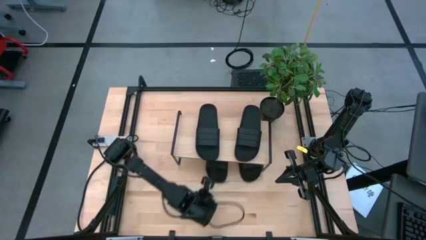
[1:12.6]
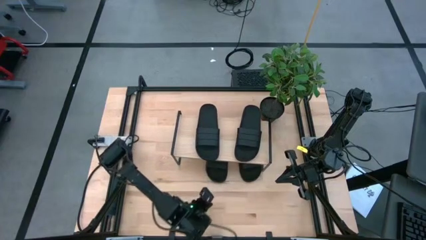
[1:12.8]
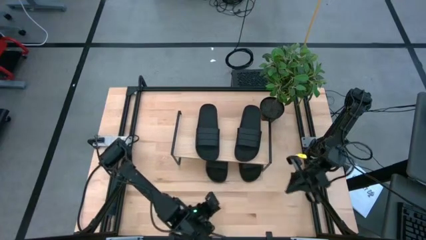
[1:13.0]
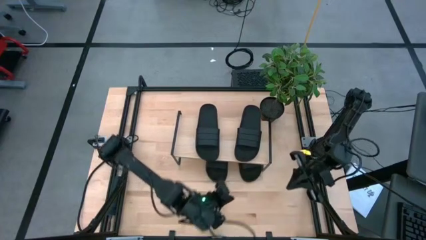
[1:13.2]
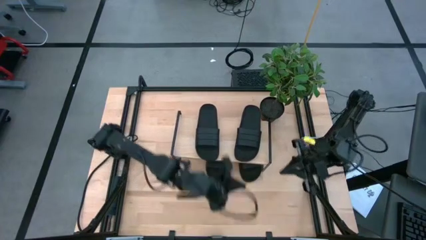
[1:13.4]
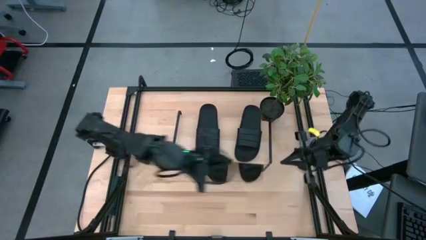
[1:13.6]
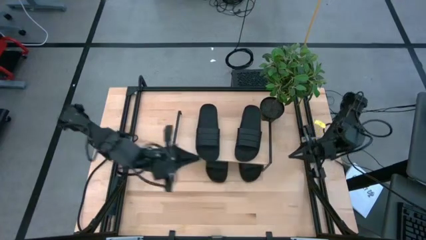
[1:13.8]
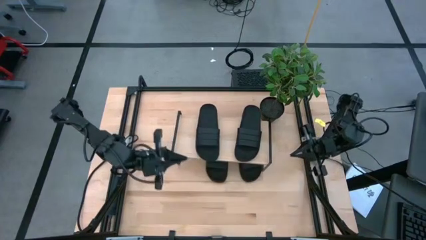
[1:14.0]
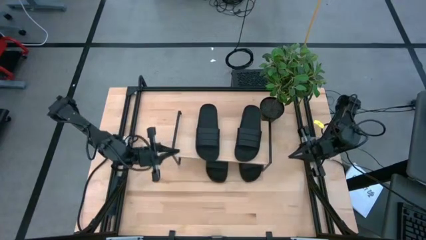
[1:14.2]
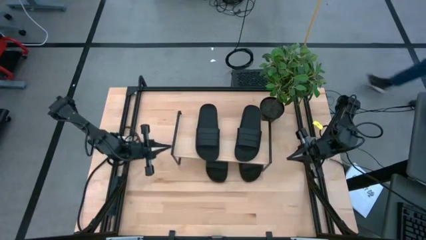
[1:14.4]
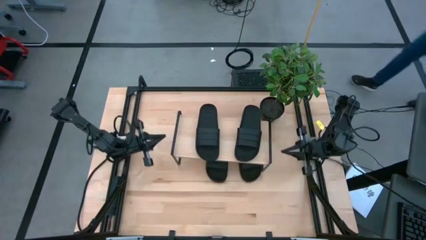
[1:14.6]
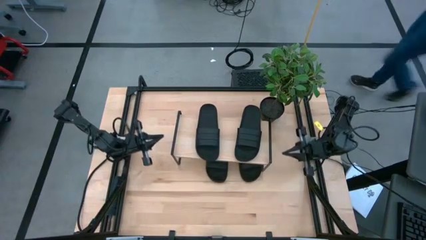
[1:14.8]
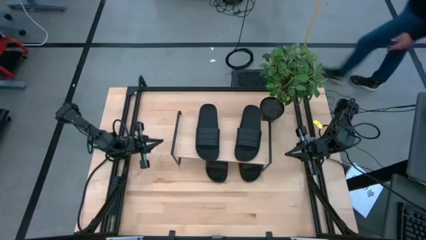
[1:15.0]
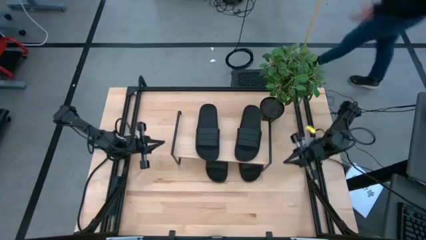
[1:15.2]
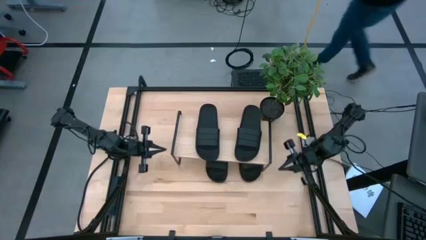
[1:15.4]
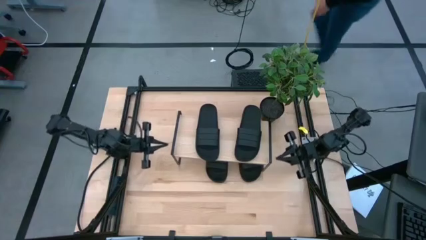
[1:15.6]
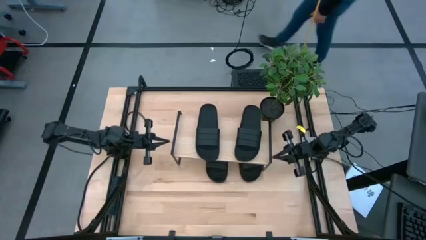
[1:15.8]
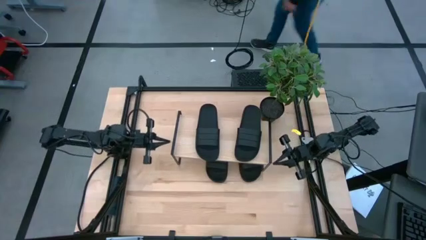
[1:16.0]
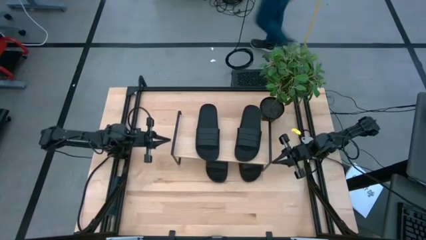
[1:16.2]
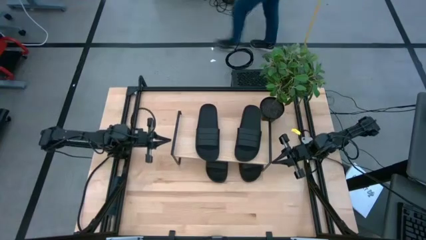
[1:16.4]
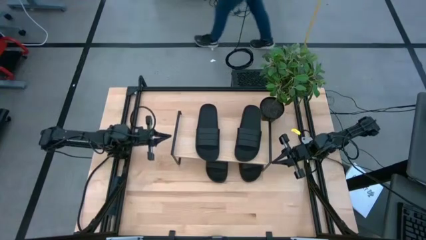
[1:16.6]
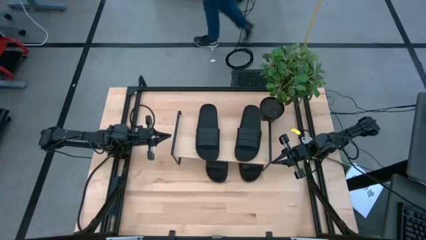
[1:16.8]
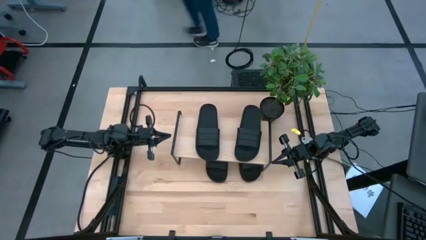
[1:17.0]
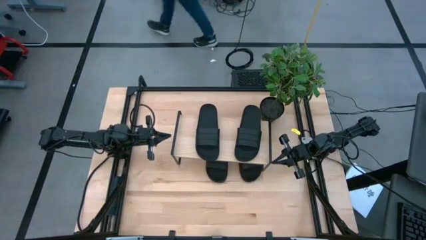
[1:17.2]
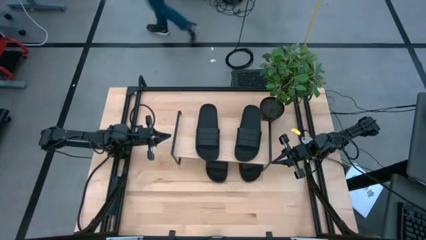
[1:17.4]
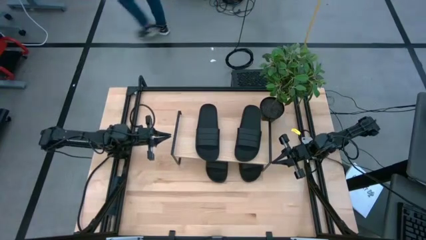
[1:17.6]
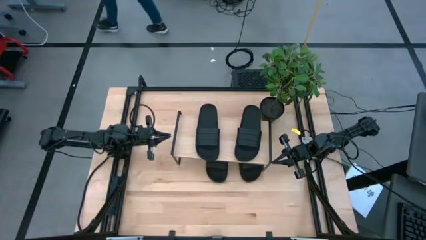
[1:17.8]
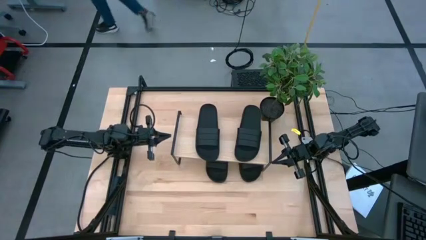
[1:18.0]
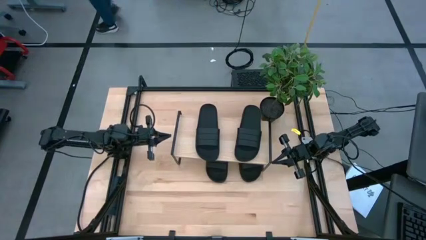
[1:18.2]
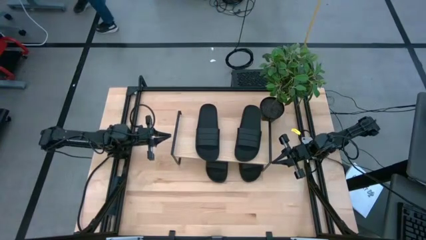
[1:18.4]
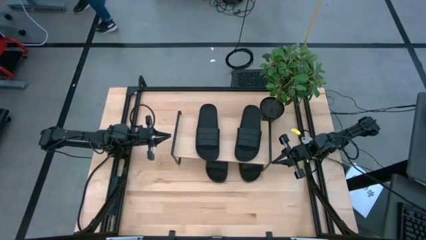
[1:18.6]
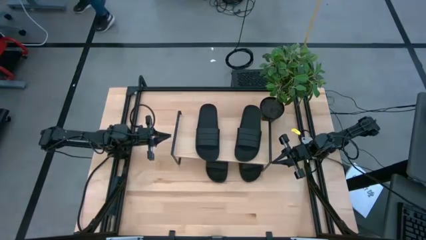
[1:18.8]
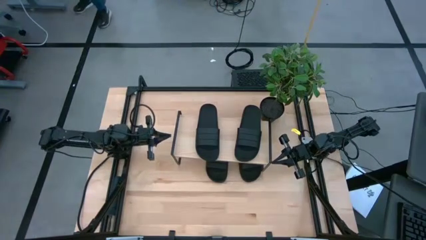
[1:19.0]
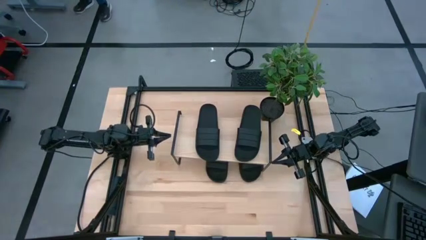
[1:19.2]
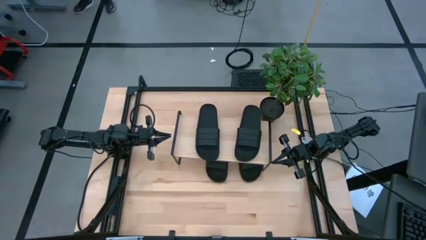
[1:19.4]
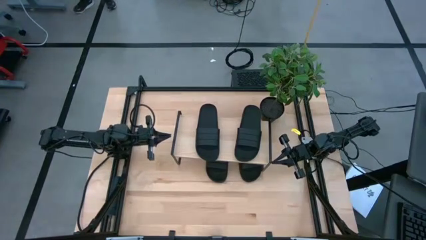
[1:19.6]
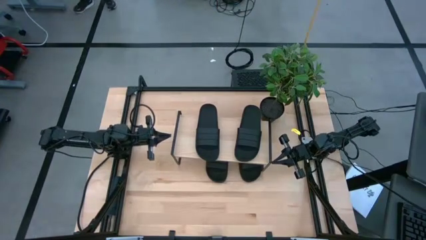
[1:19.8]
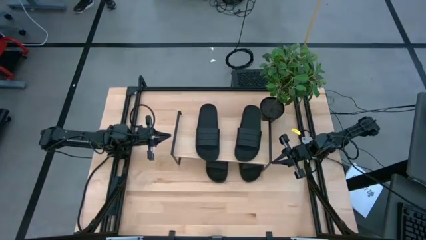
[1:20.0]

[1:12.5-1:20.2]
Task: Pick and place slides into the shelf
Return to Home Position

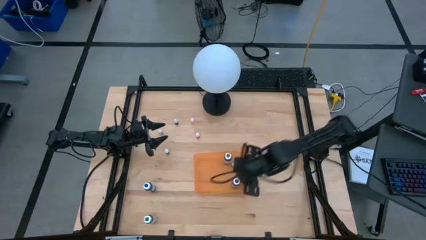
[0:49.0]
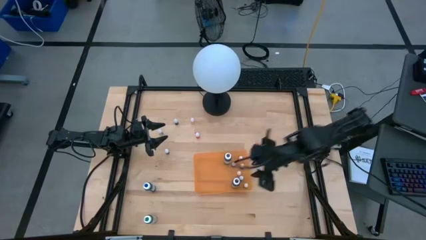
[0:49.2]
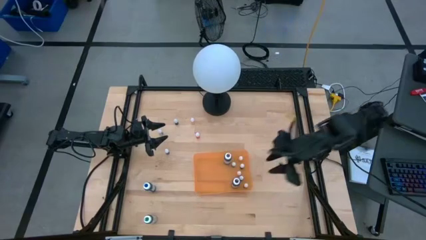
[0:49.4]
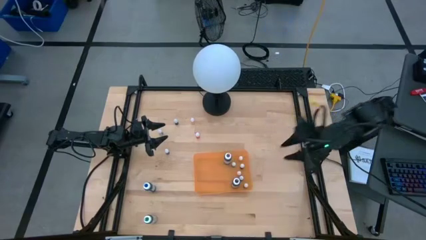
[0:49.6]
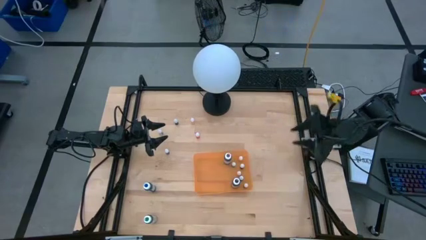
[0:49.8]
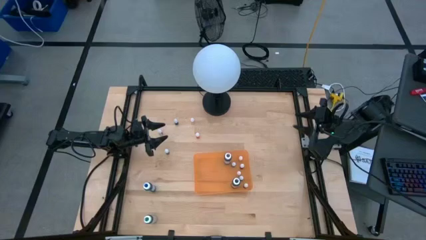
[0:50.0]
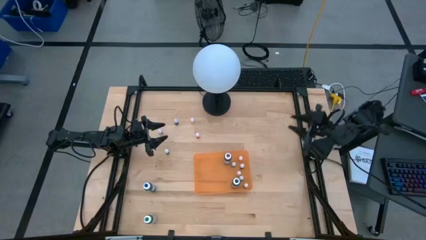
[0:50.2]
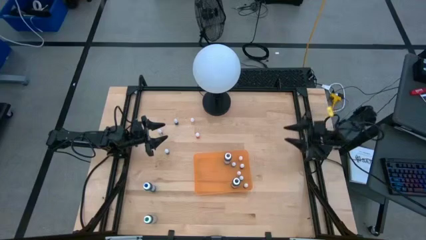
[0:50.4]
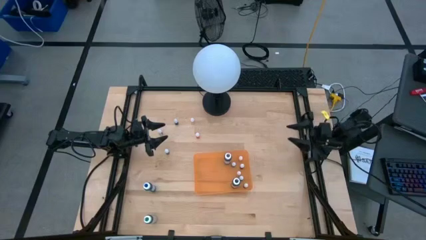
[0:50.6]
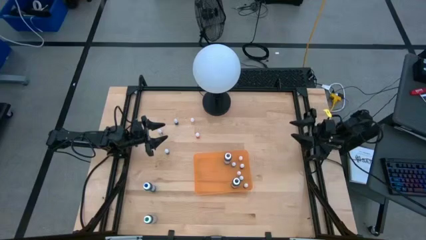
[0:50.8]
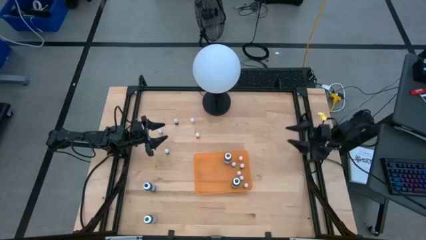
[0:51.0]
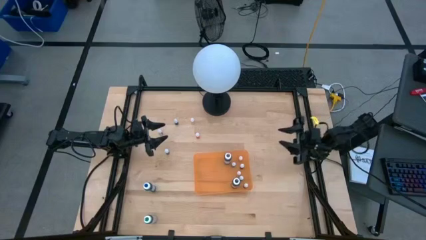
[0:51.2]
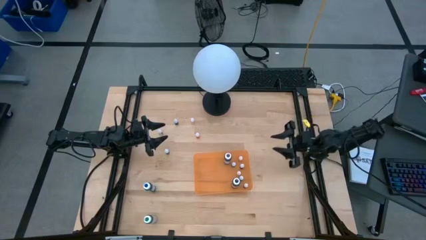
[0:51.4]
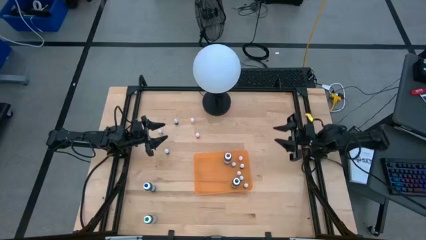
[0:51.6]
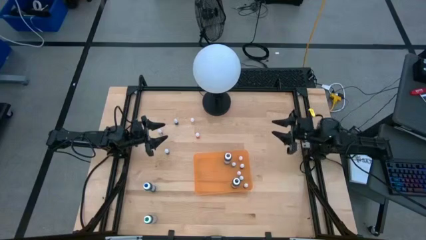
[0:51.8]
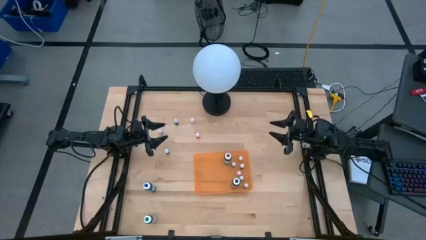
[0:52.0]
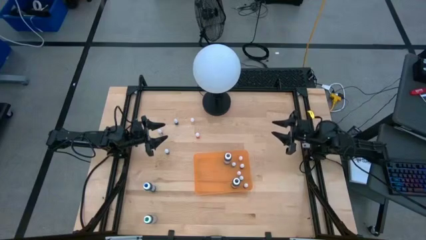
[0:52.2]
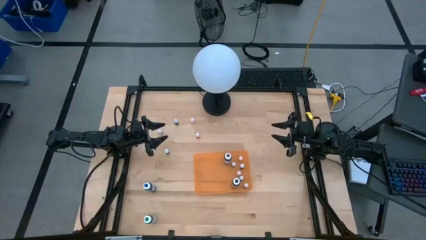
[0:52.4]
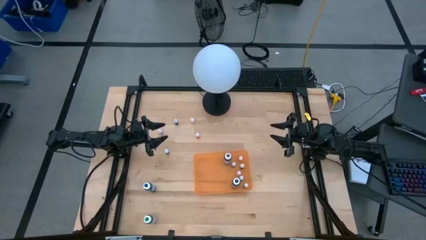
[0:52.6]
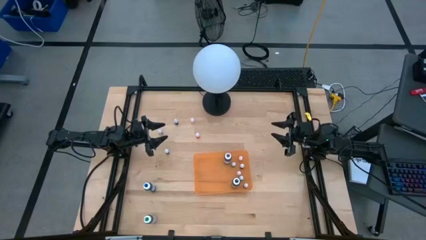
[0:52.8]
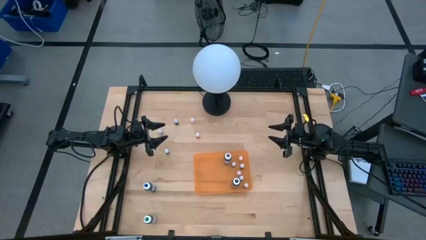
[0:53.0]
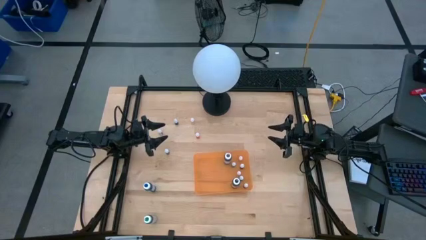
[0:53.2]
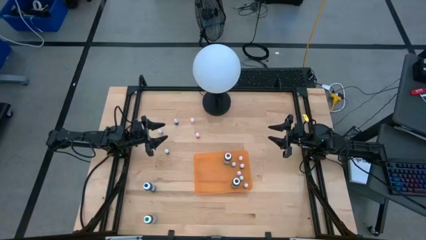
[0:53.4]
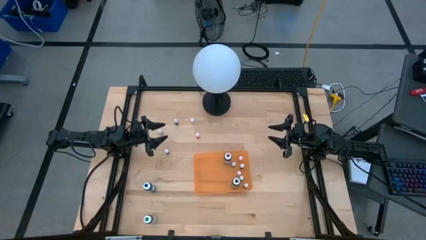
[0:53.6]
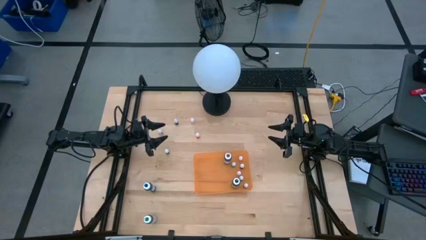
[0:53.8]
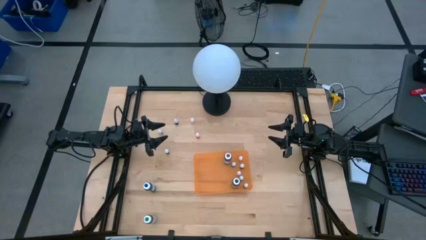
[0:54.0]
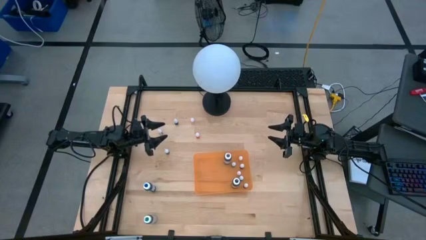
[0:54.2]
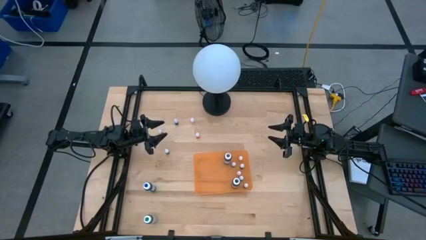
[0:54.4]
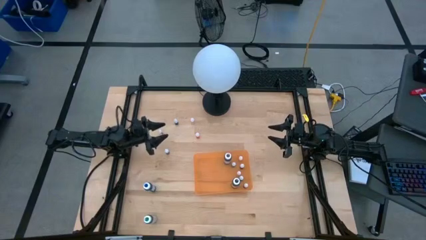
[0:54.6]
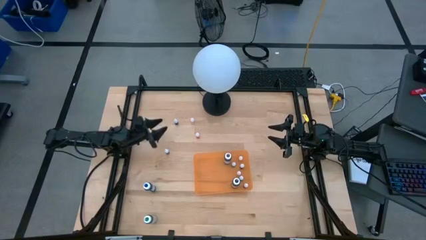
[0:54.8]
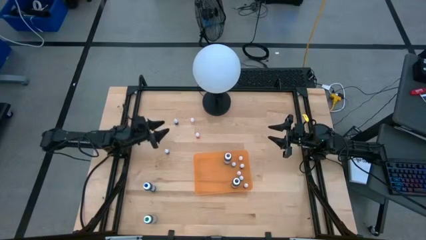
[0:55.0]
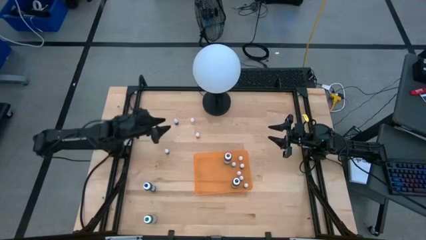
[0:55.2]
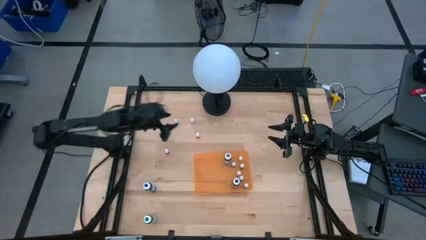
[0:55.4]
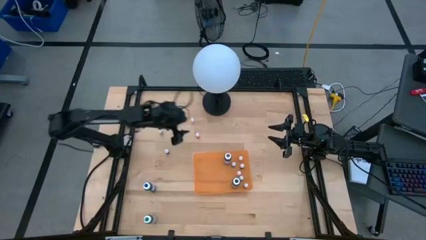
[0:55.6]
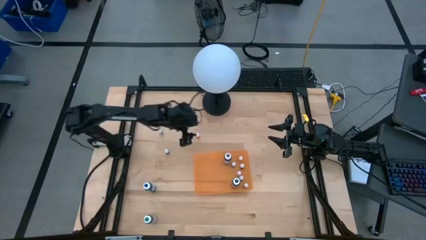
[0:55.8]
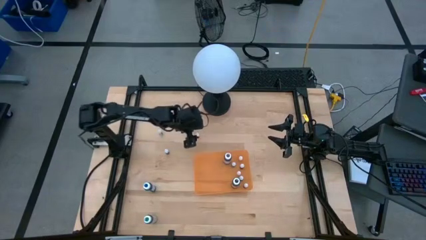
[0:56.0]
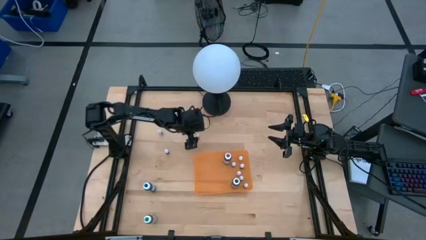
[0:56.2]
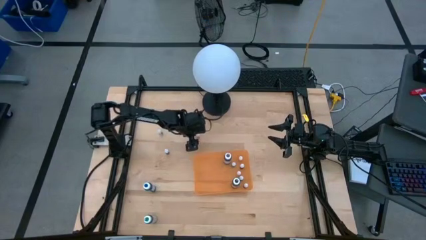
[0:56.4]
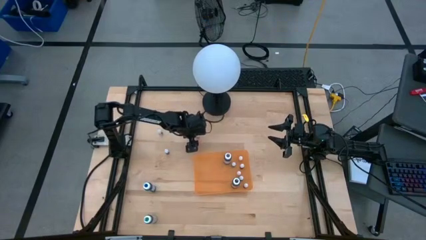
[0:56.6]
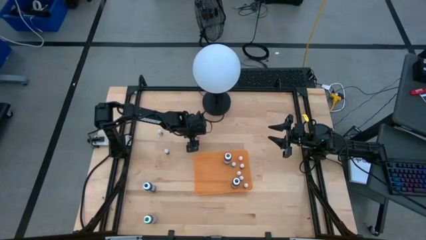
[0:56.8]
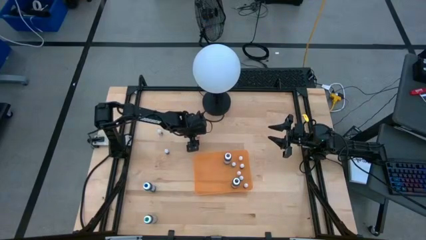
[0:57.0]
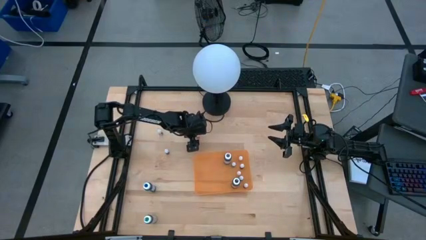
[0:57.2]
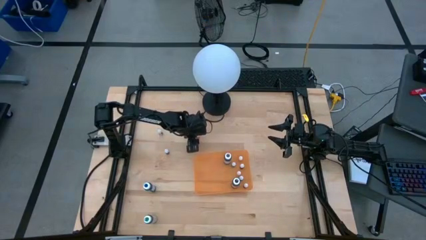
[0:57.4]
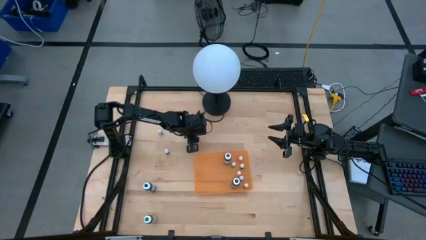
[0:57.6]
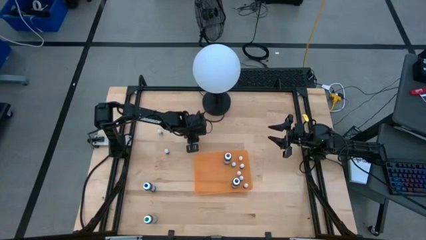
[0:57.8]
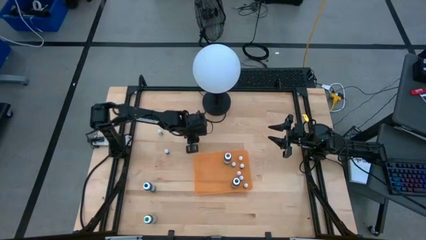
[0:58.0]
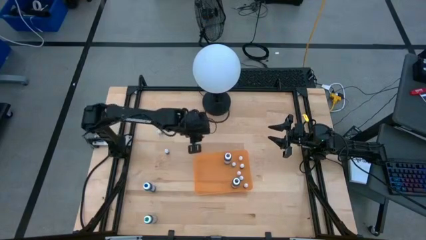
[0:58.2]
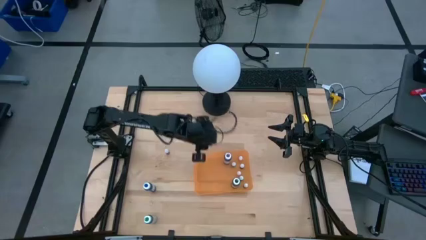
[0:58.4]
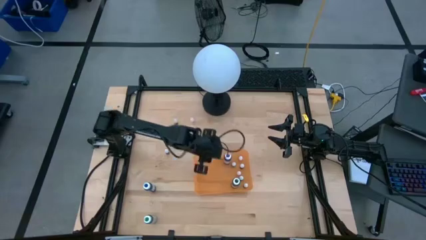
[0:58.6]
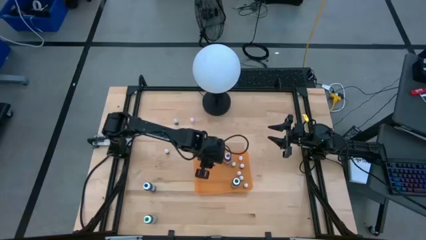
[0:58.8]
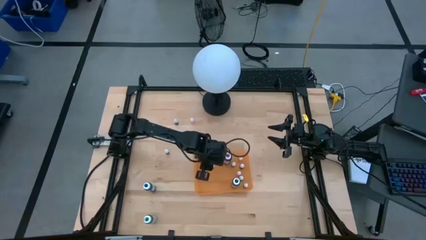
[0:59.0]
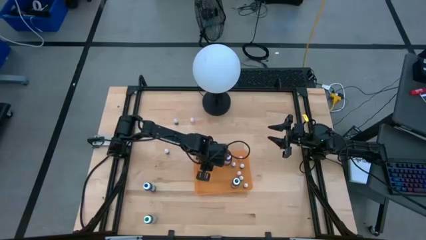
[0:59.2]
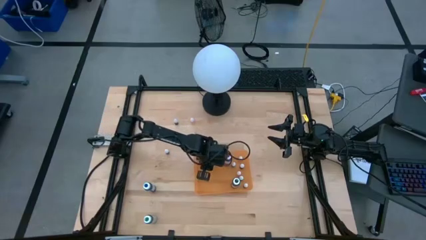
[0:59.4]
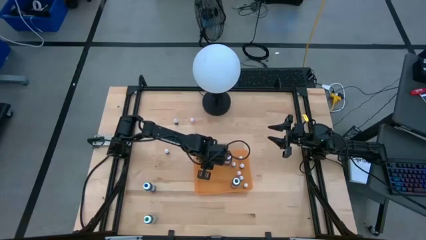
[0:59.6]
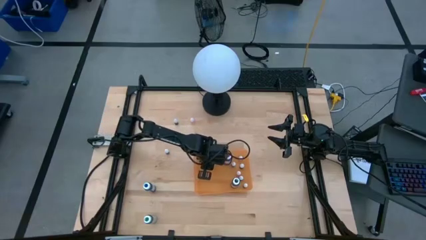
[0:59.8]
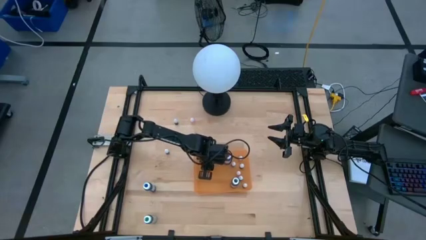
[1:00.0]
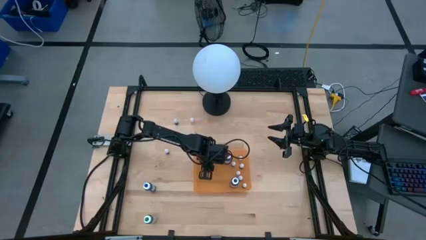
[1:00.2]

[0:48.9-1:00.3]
Task: Pick & Place food coloring
Put the small orange food coloring bottle into the orange container
